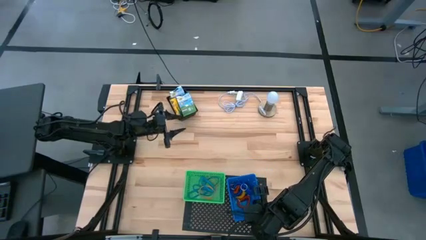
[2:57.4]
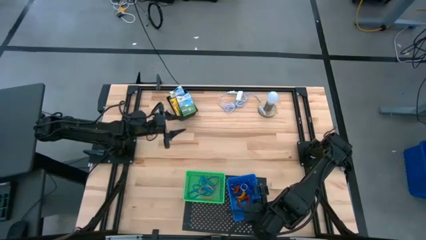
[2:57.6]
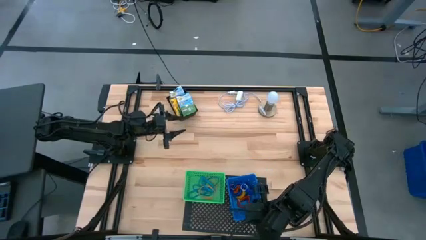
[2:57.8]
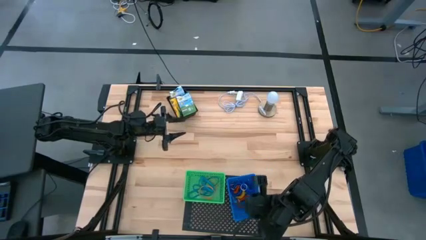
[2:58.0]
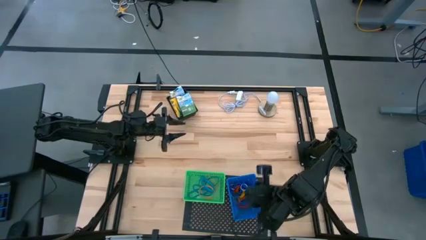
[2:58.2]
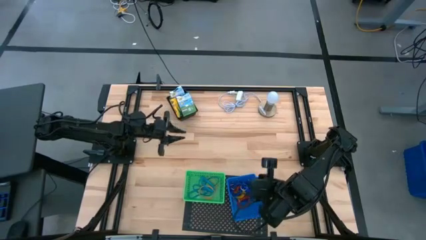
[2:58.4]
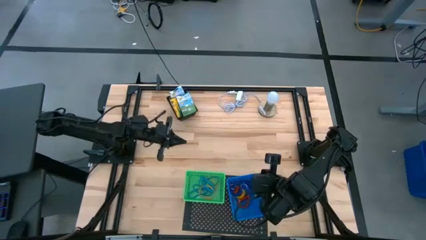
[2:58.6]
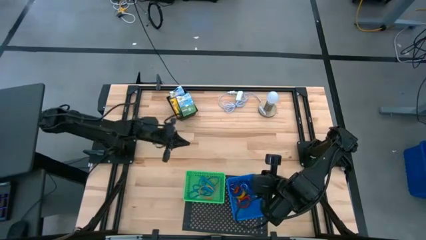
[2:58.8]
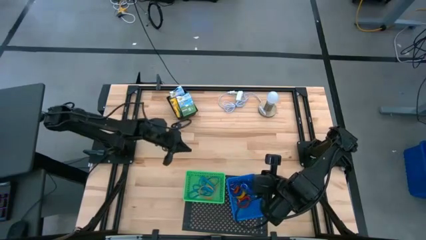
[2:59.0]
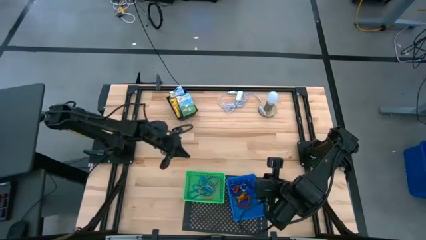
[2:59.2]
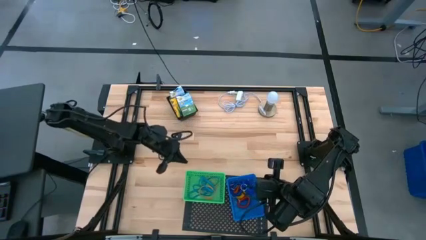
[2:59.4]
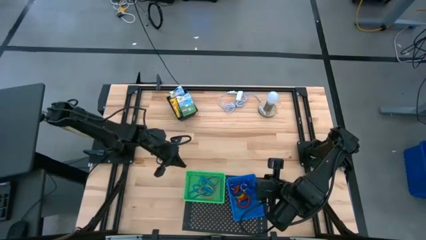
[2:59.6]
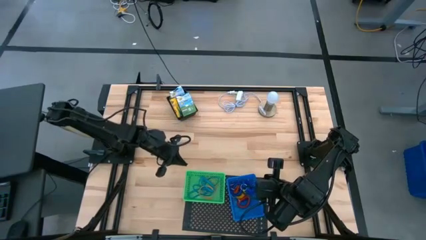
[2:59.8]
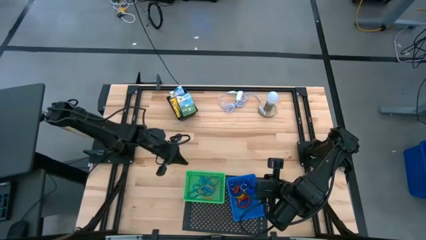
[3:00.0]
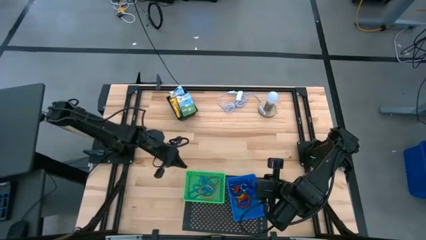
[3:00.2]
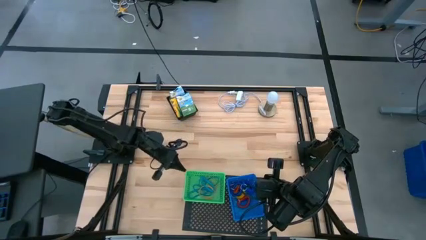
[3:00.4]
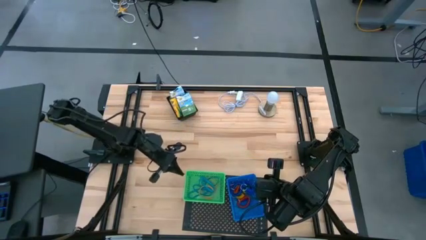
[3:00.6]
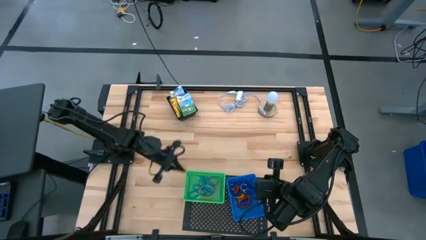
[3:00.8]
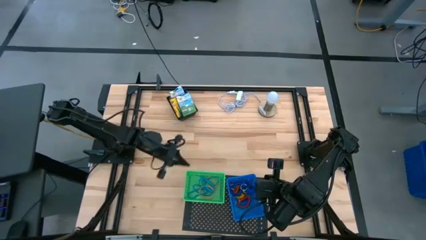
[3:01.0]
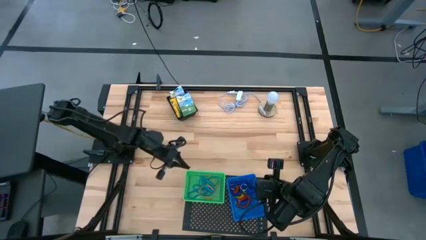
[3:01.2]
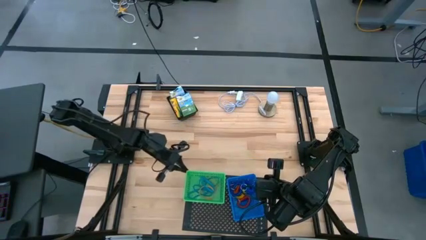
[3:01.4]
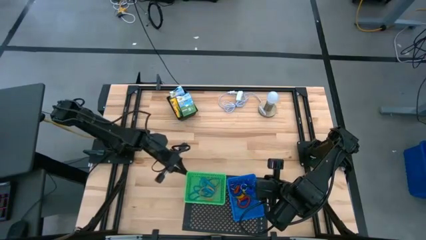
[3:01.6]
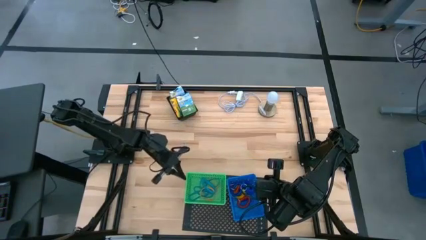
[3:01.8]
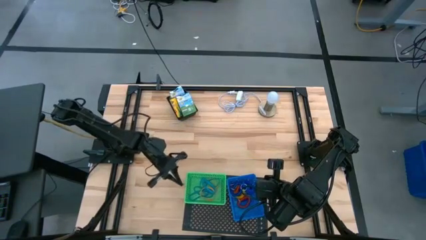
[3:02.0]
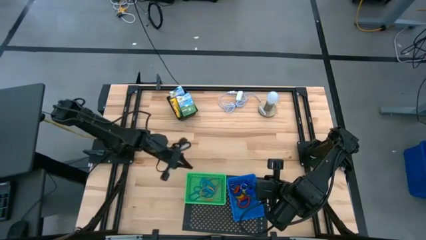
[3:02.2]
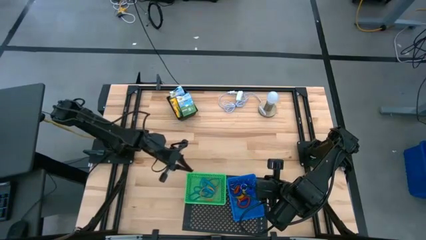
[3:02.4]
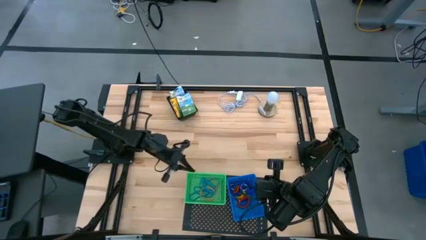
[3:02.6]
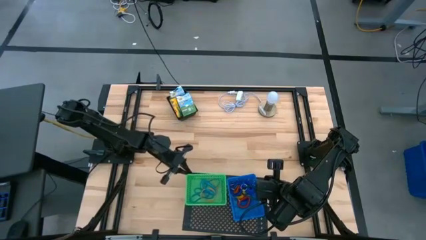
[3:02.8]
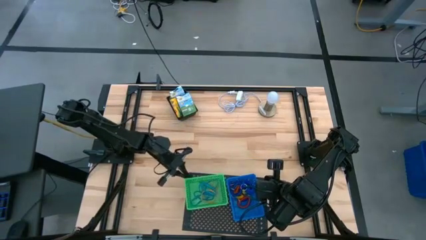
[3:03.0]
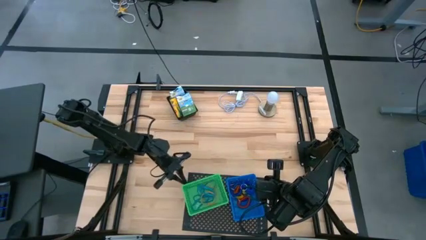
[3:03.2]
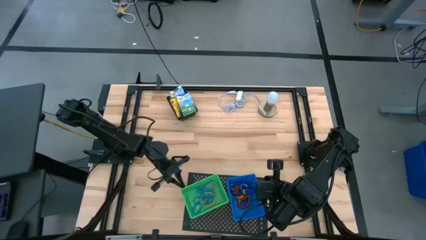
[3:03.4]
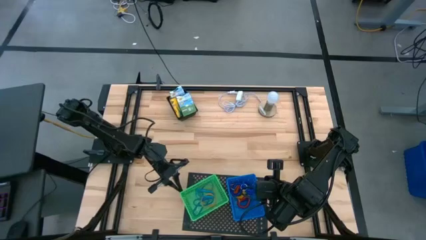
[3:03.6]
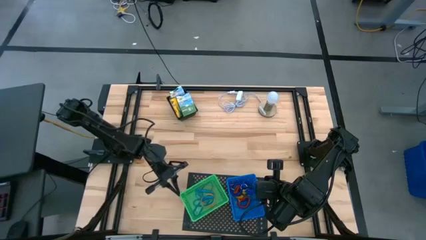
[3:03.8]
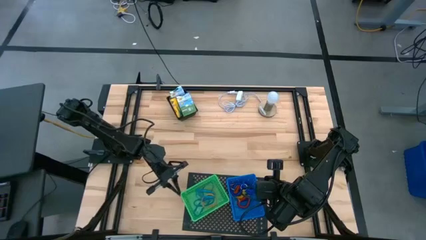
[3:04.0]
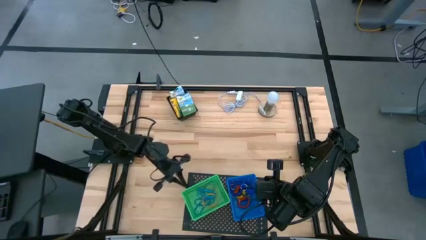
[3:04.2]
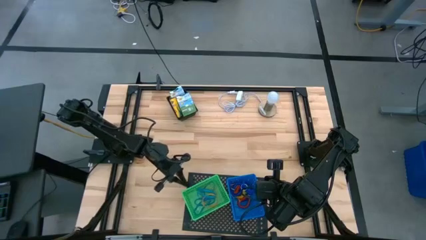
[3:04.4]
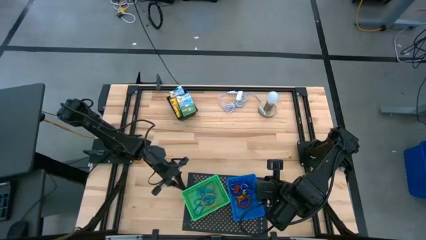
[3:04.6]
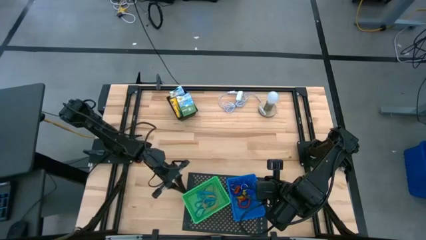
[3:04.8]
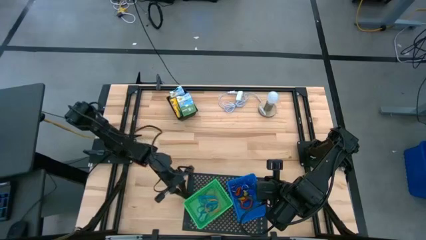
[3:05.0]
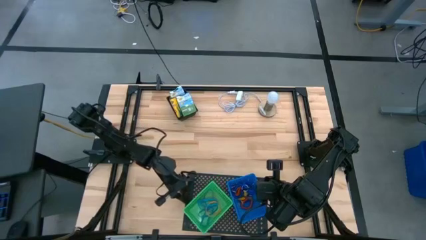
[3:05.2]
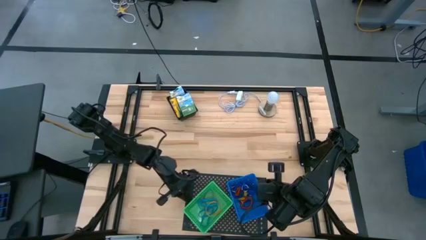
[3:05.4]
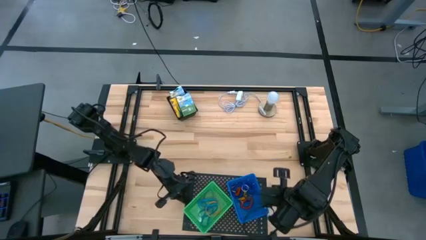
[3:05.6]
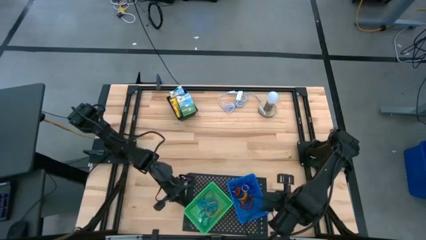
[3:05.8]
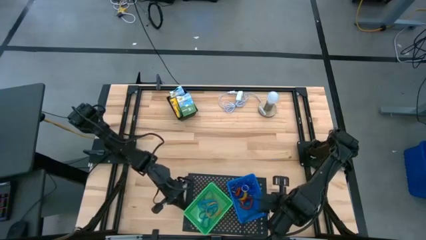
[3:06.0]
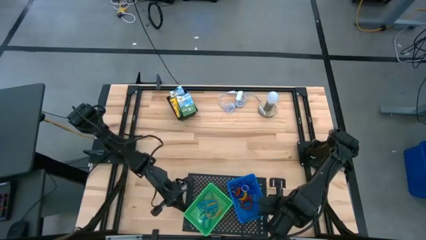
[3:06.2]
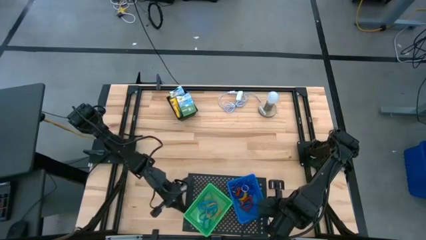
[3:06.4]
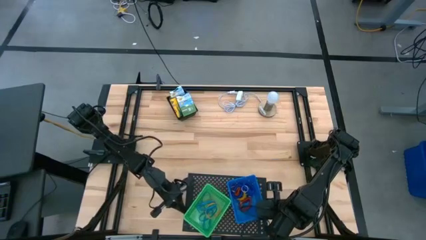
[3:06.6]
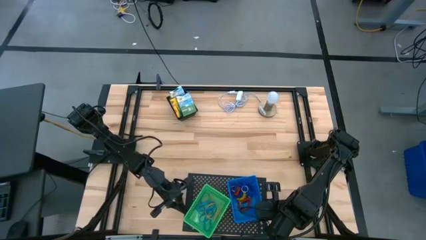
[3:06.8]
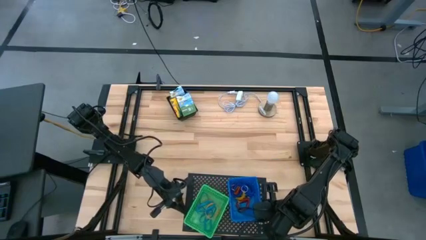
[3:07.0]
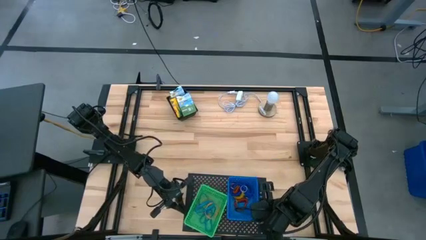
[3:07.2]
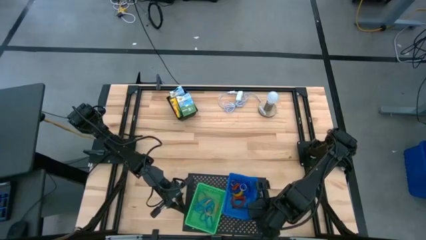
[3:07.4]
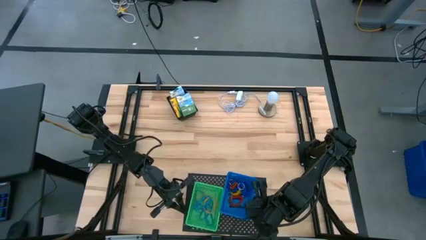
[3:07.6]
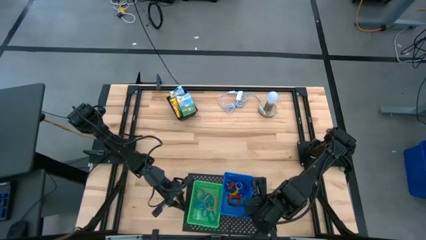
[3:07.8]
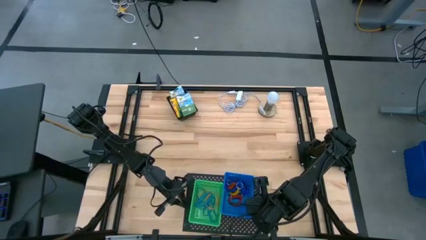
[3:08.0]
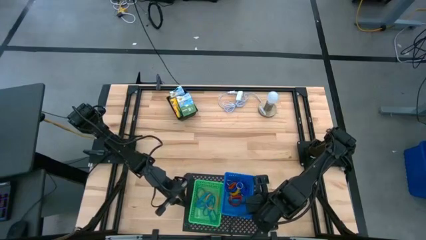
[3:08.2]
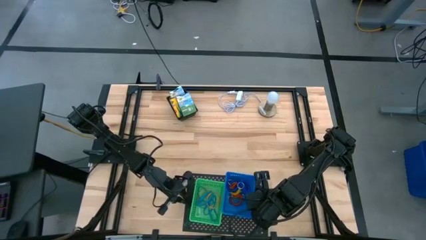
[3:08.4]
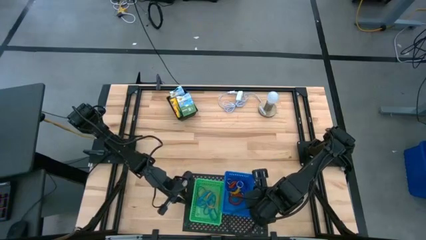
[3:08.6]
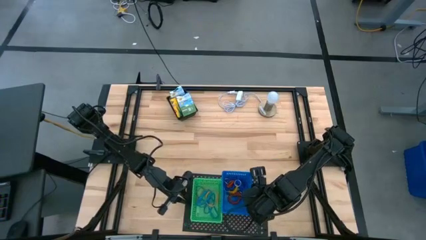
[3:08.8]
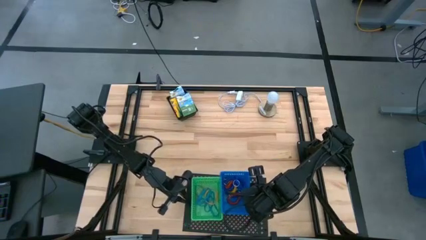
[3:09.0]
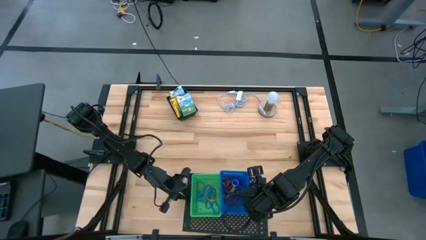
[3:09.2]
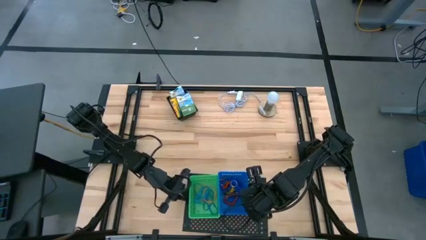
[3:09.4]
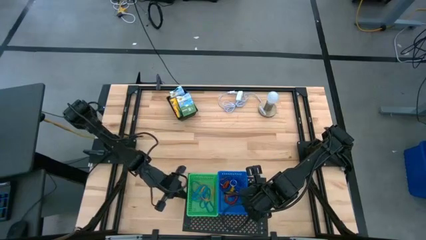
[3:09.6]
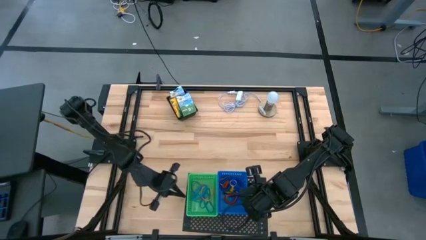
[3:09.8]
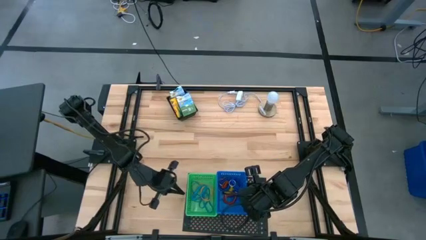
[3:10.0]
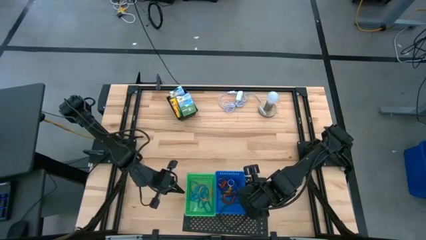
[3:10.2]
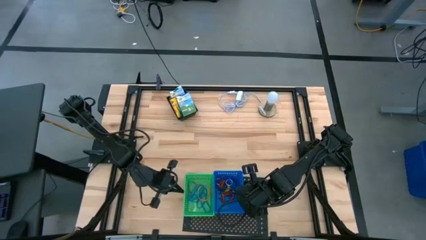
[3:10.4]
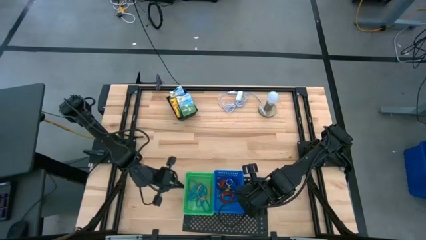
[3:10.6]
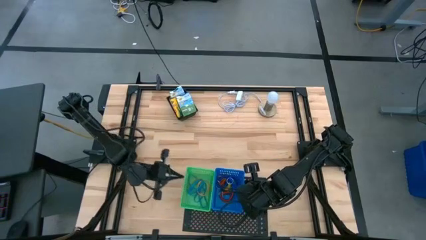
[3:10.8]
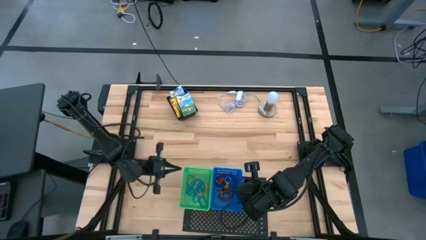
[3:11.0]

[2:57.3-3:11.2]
Task: Pick & Place Office Desk Supplies
Adjust the green and blue bin
